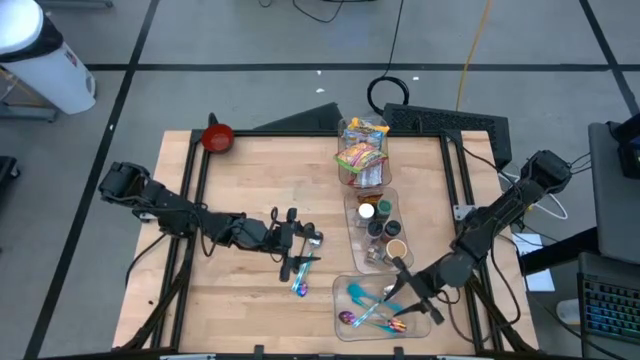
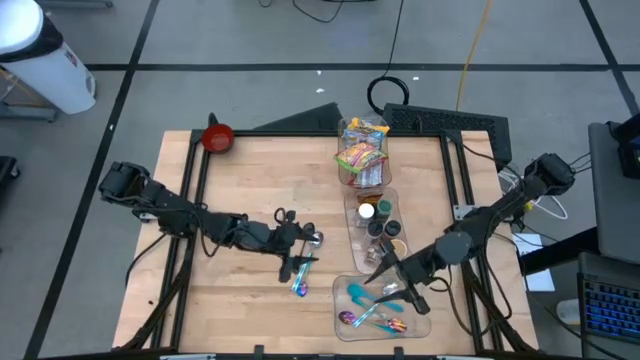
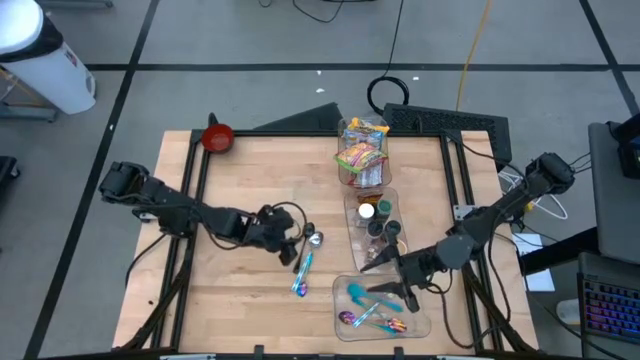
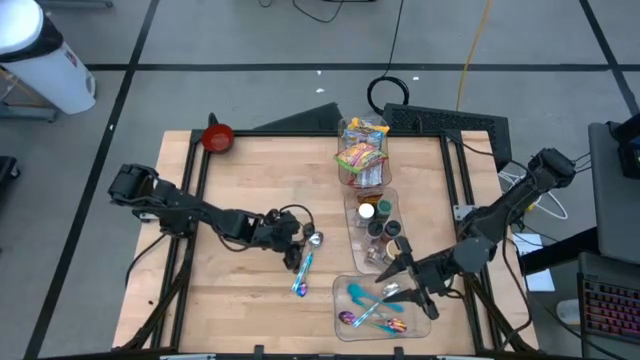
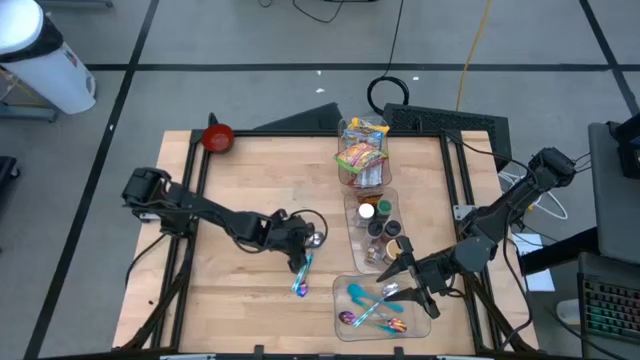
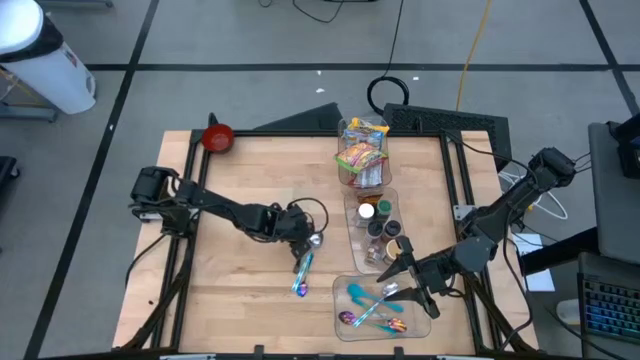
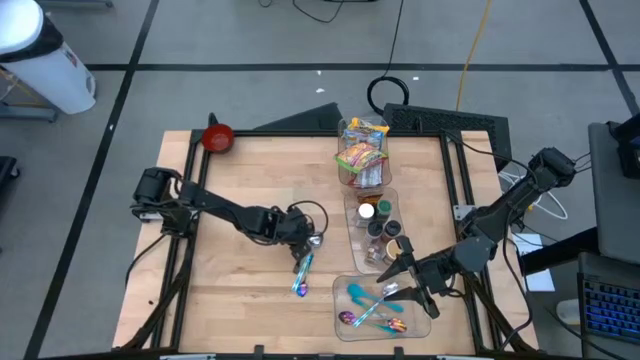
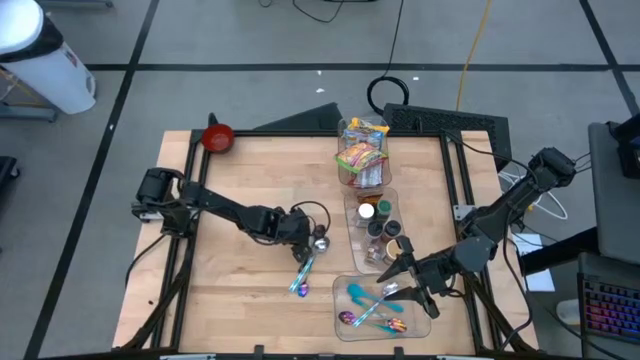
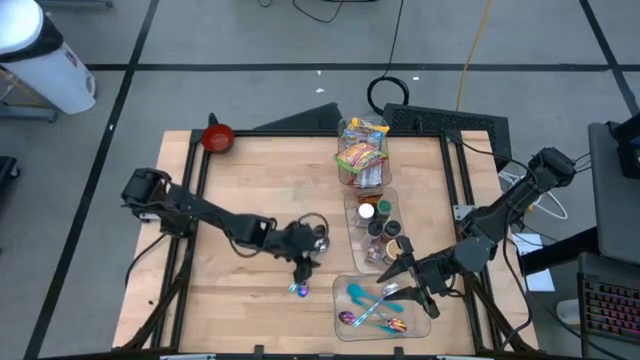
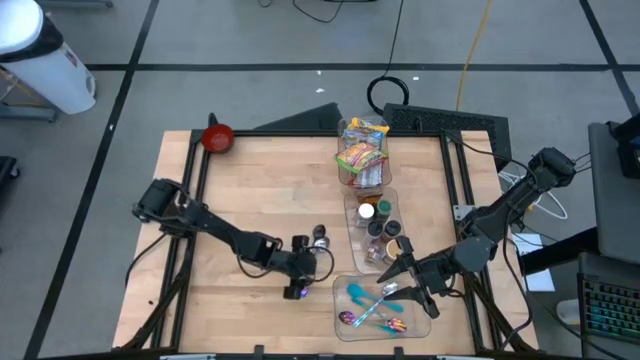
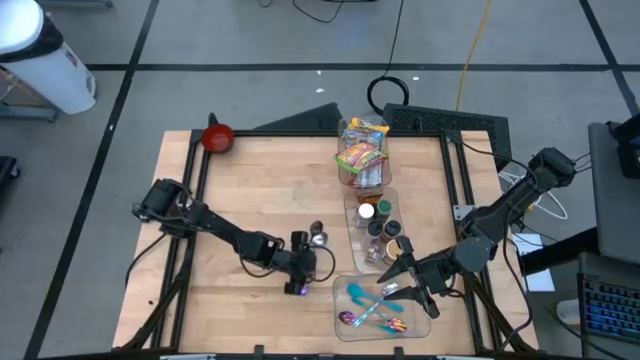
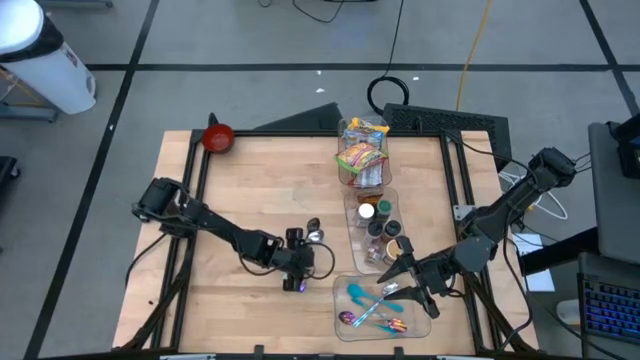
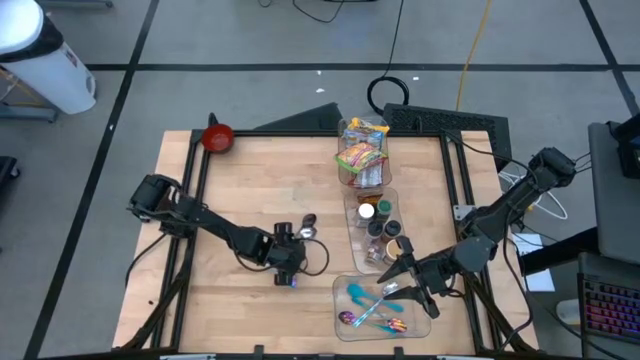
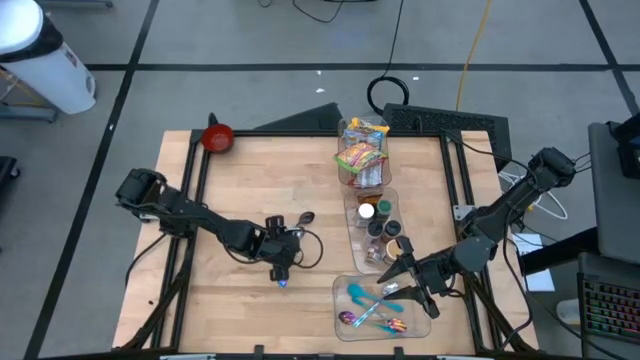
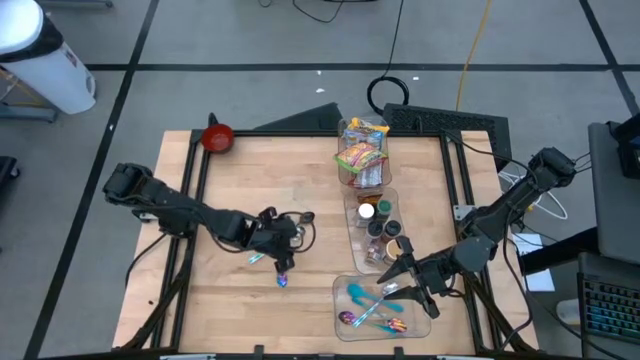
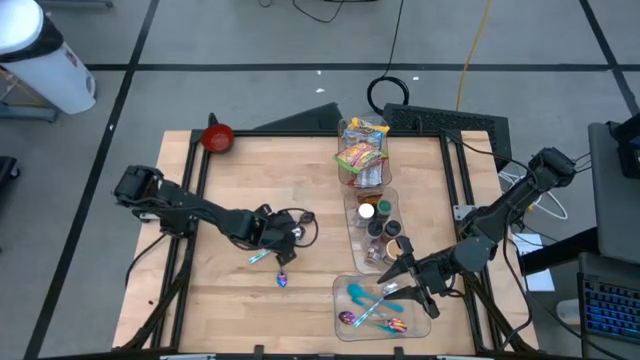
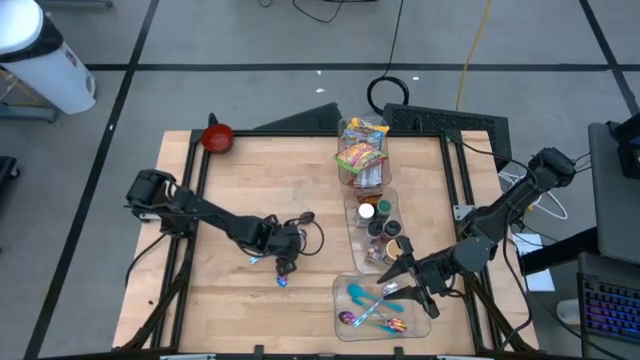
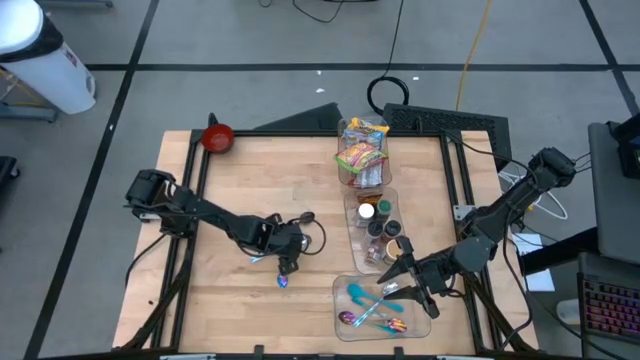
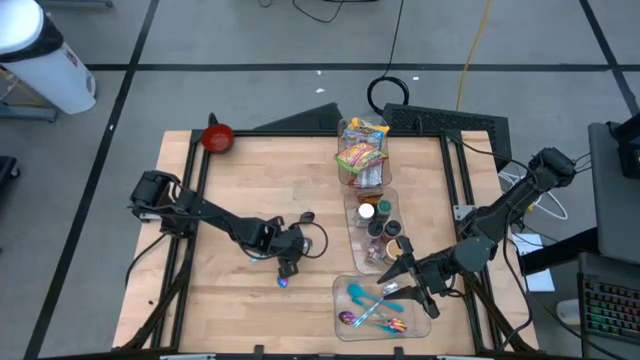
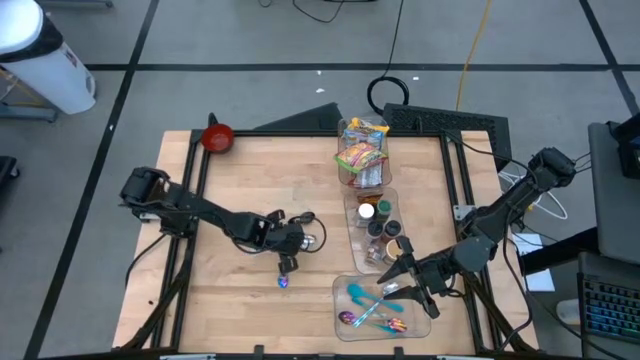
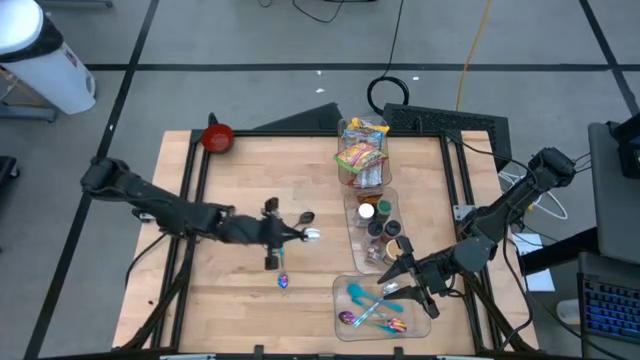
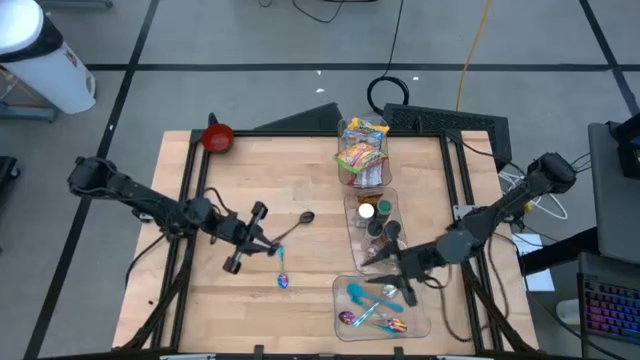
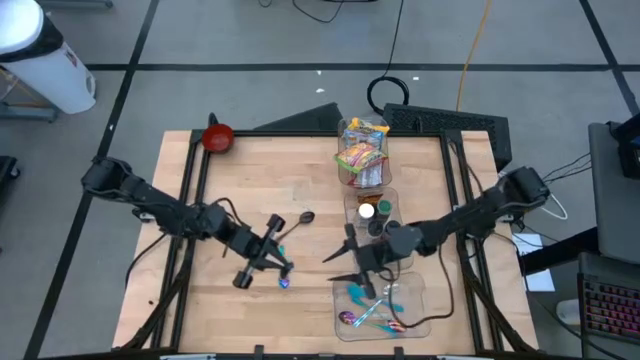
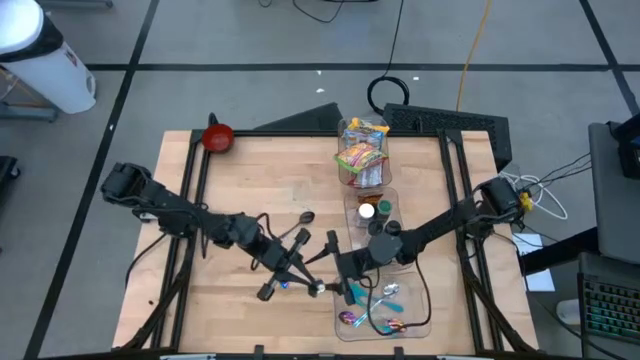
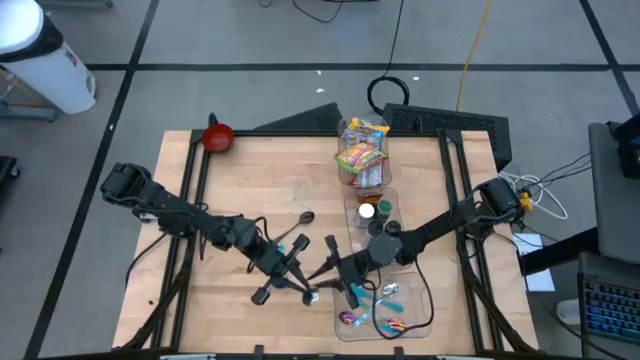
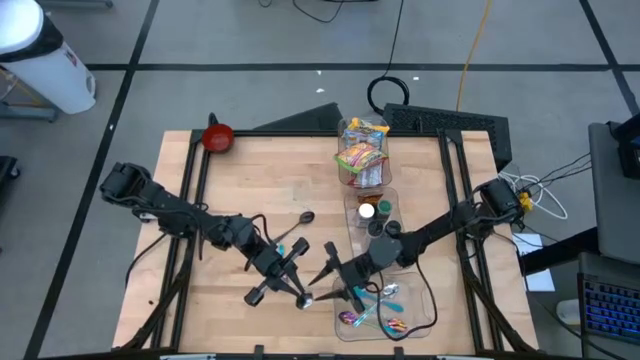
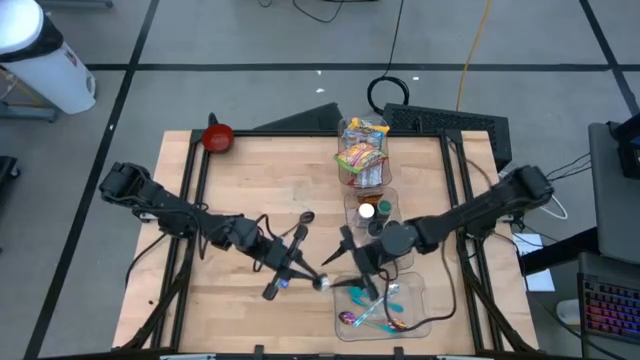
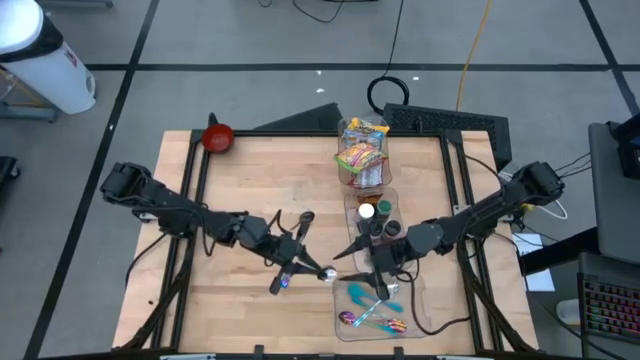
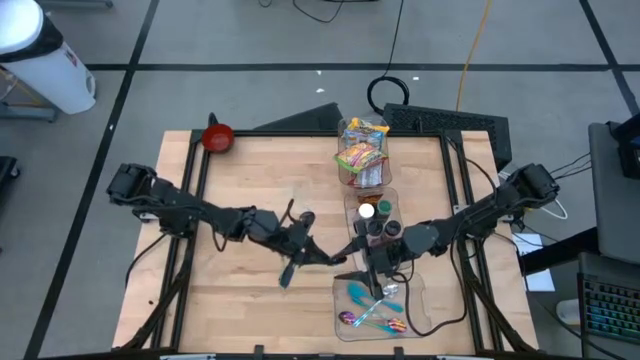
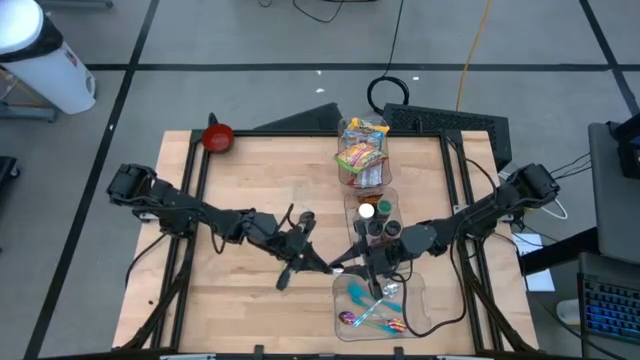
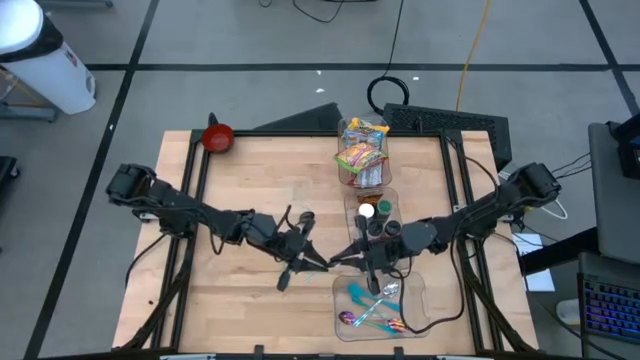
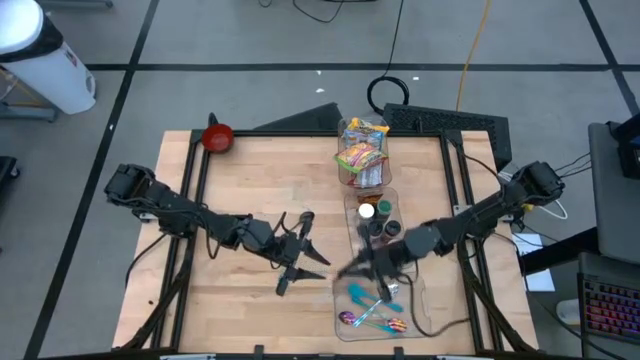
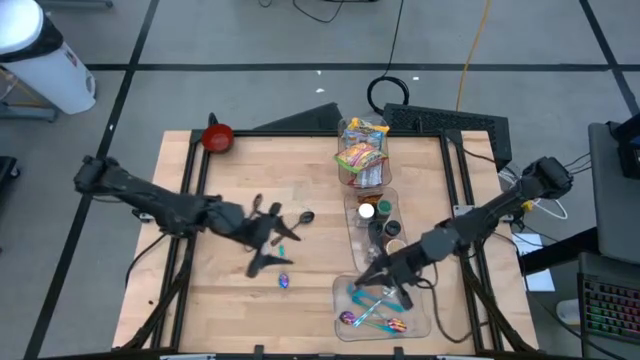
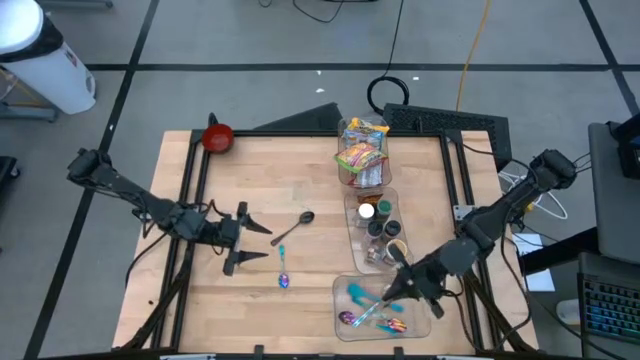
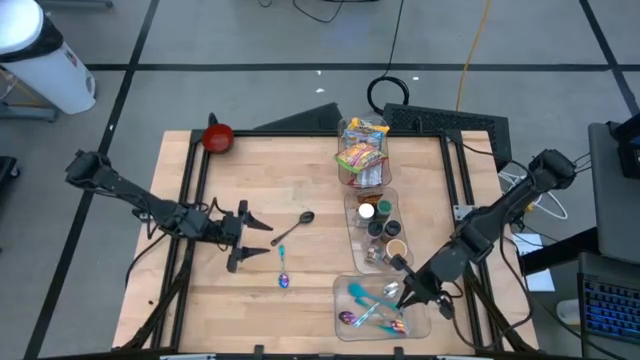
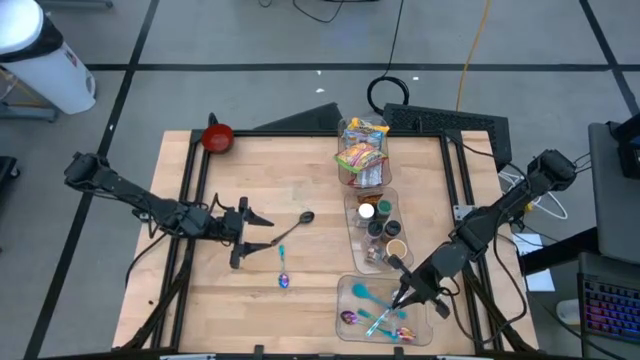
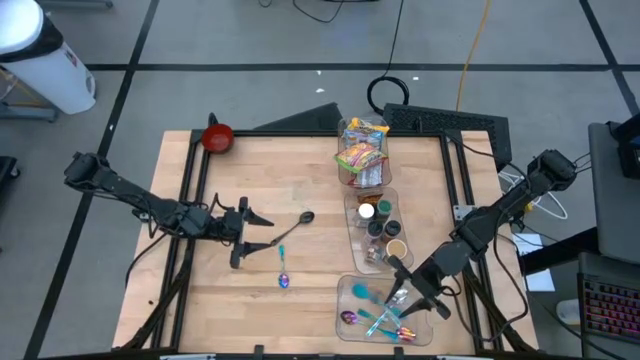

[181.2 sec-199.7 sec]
Task: Pick & Place Food Item
Put the light blue spoon into the bottom transparent bin
